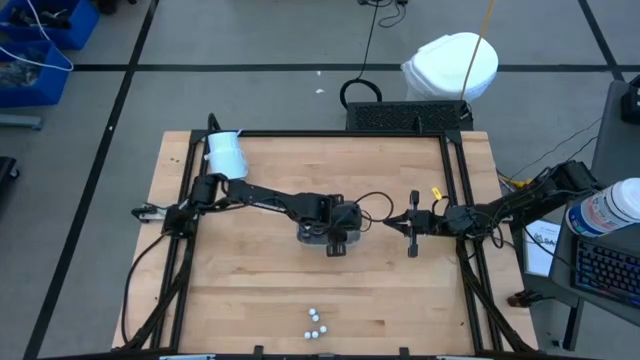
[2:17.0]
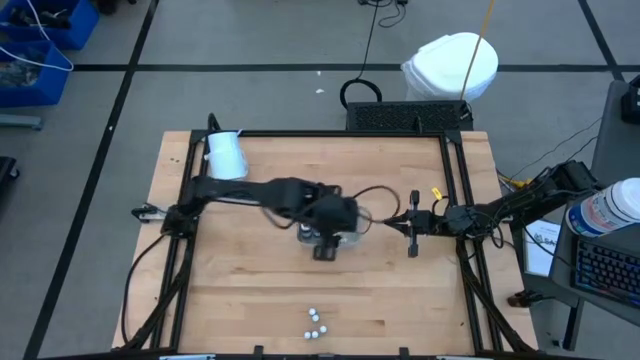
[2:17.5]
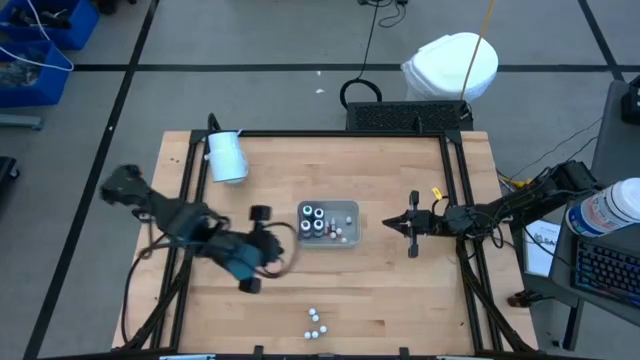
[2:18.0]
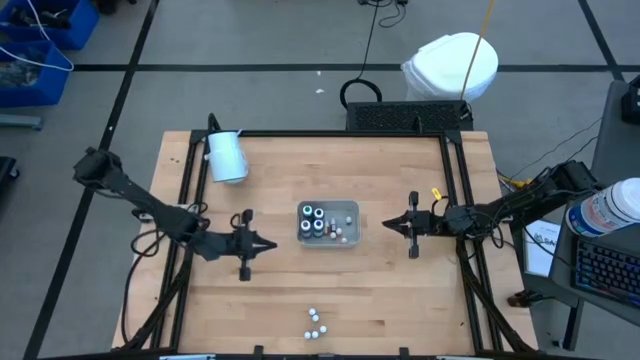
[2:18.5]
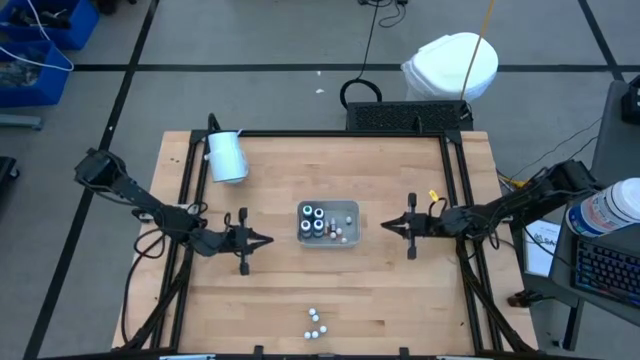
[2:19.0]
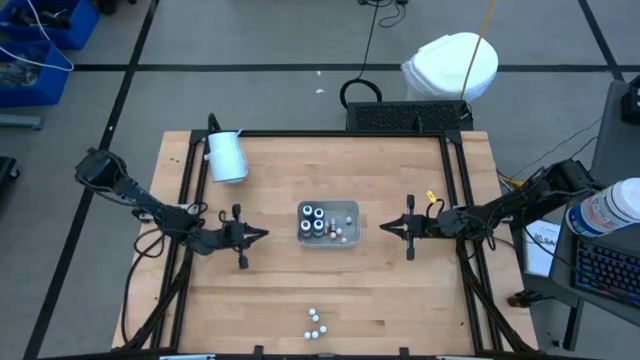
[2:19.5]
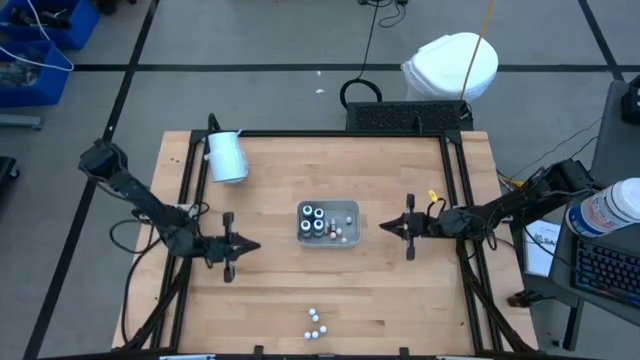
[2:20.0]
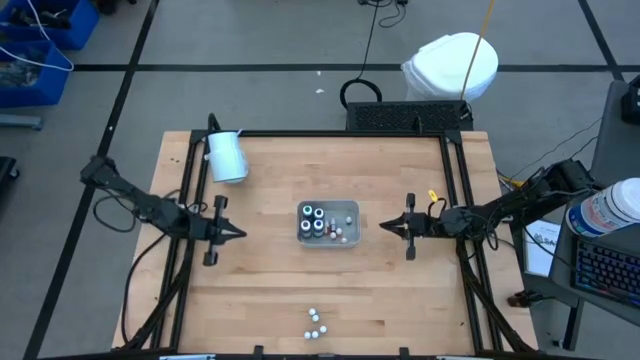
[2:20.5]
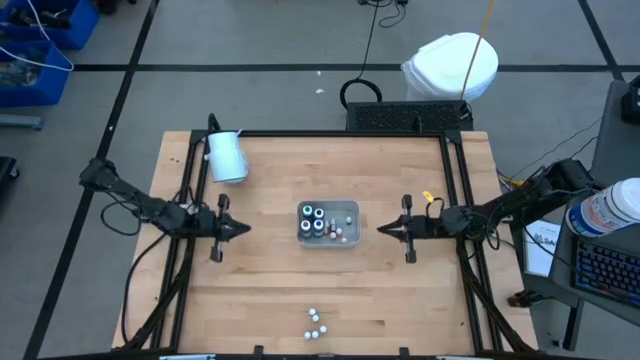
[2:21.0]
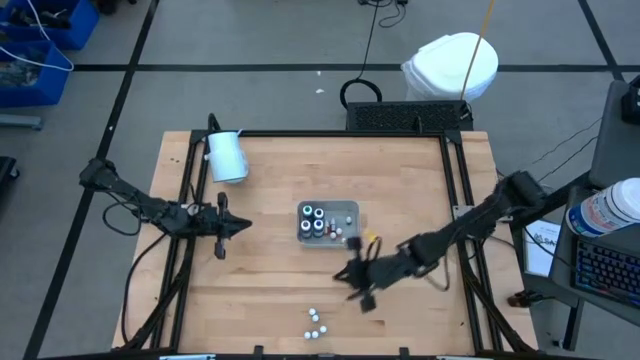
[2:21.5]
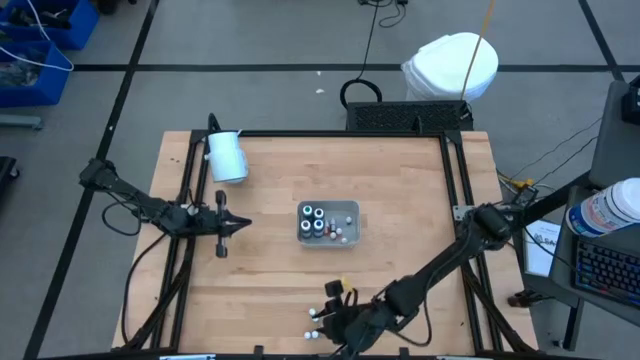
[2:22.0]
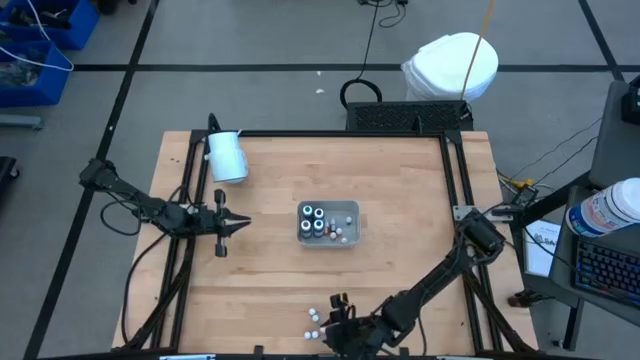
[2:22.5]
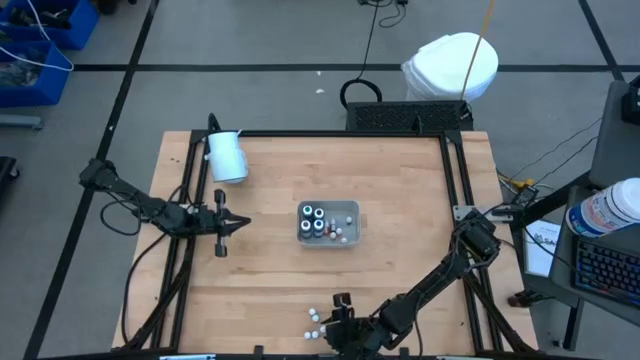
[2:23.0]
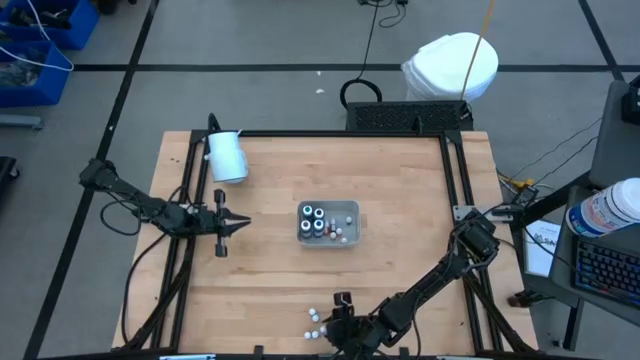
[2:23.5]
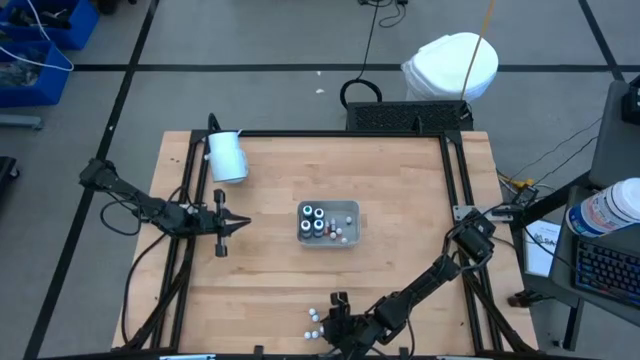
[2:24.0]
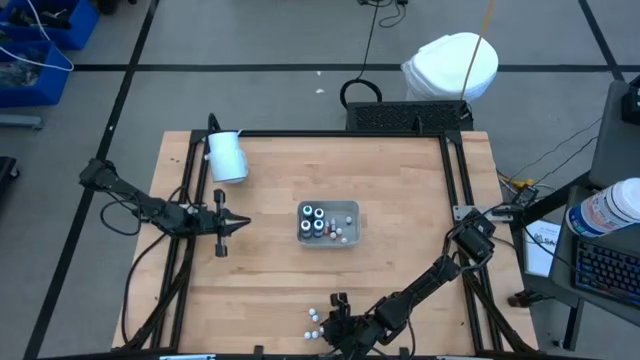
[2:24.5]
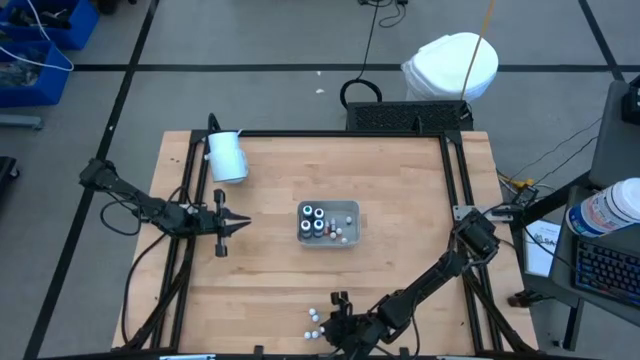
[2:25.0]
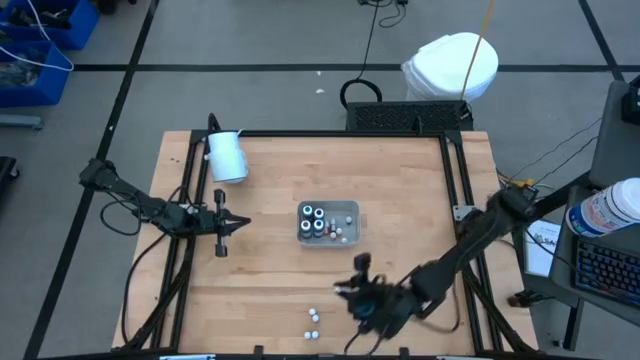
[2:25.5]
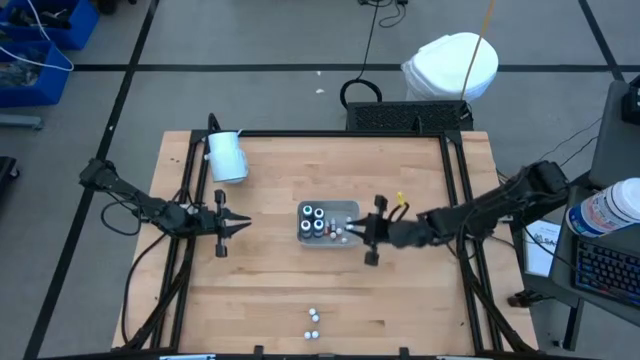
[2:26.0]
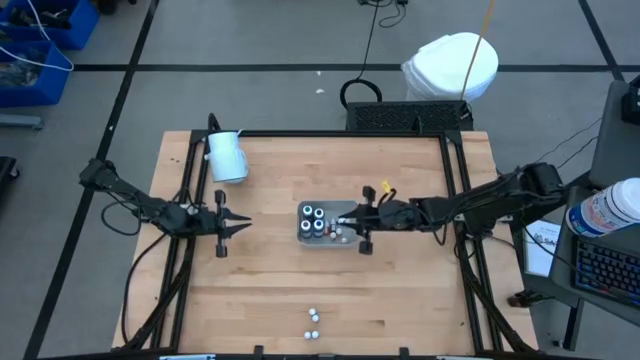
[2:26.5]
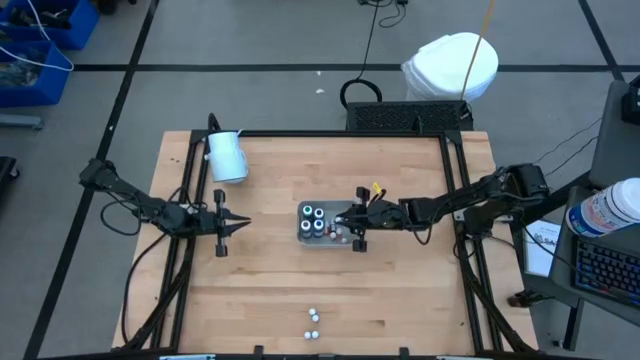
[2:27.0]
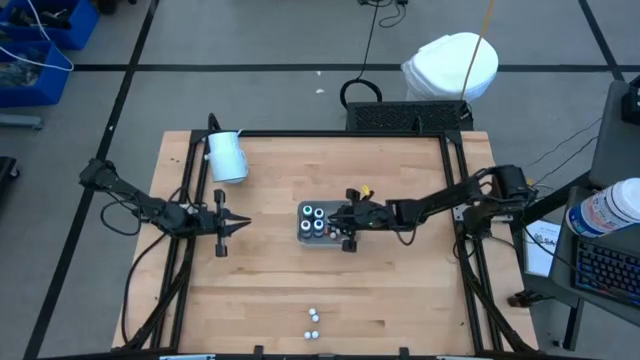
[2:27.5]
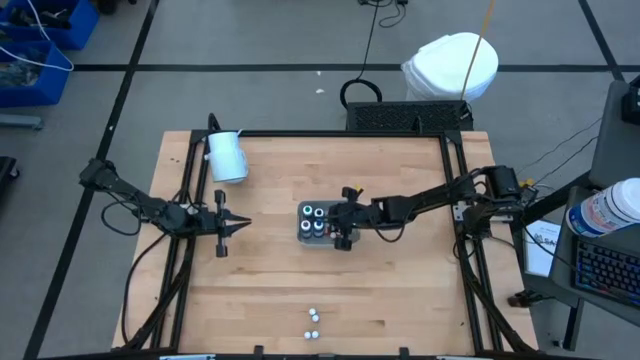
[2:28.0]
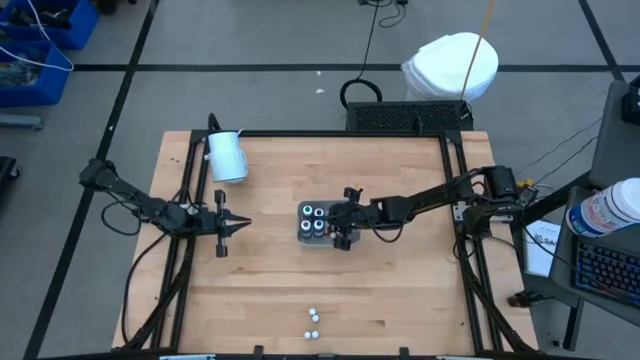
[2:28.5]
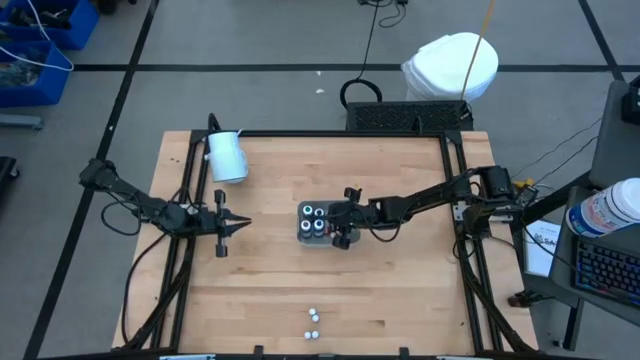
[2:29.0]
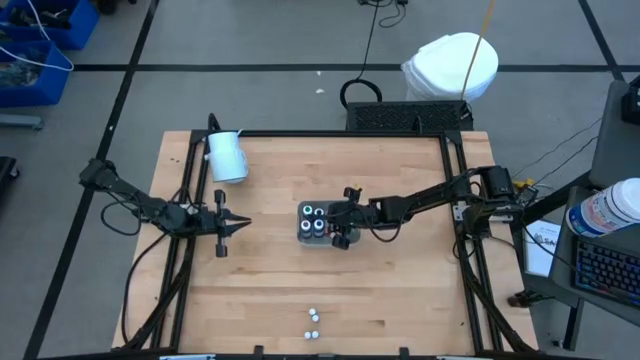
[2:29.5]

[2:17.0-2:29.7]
Task: Pick & Place food coloring
Put the small red food coloring bottle into the gray bin

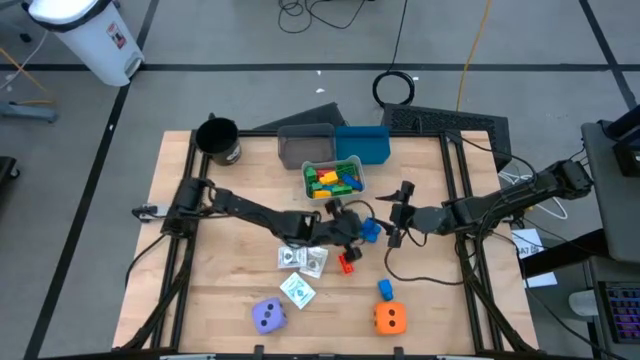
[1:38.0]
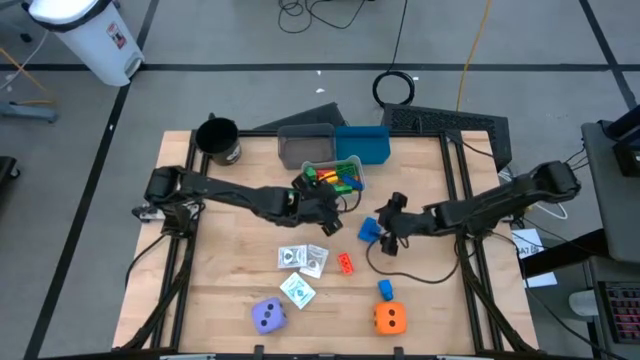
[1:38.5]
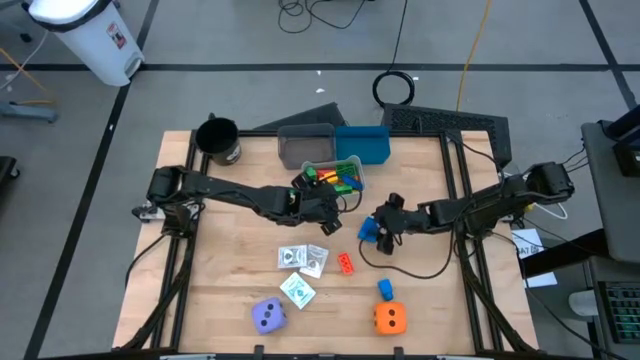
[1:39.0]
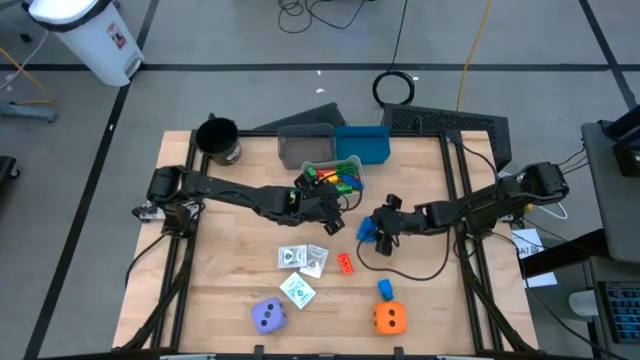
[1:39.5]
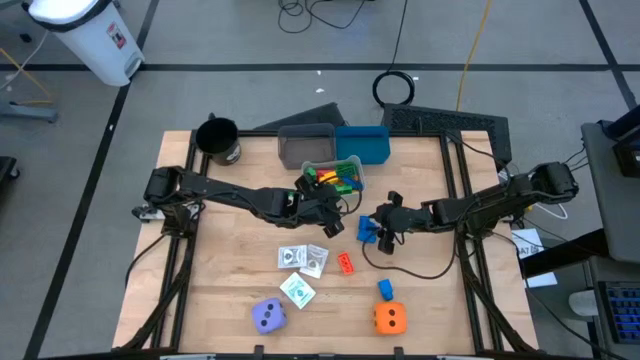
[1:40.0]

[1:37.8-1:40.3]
Task: Pick & Place Toys
Put the blue game piece into the gray bin

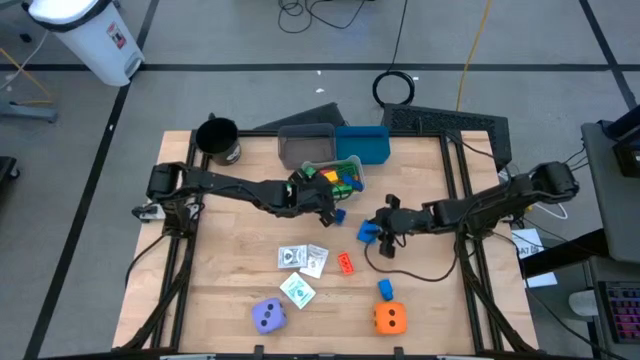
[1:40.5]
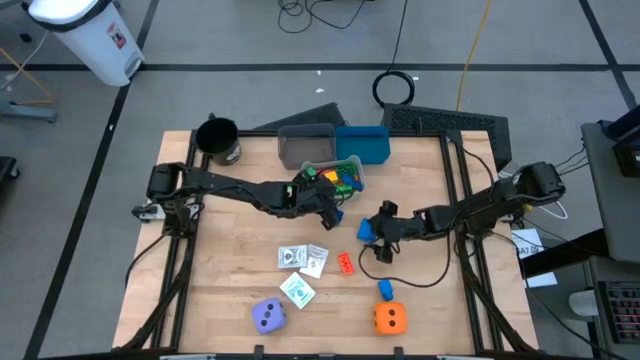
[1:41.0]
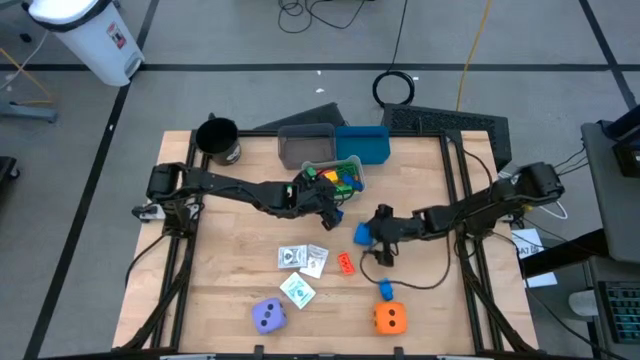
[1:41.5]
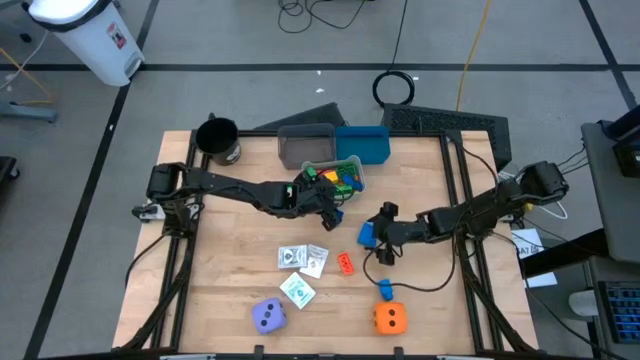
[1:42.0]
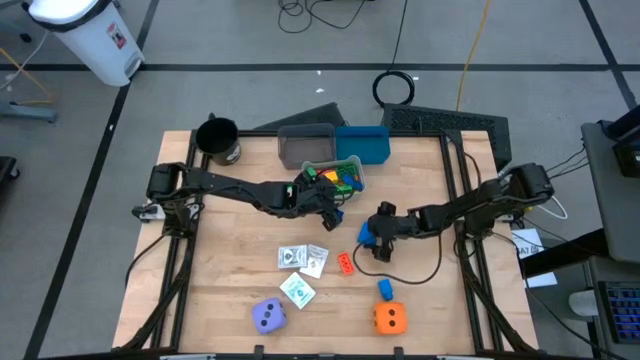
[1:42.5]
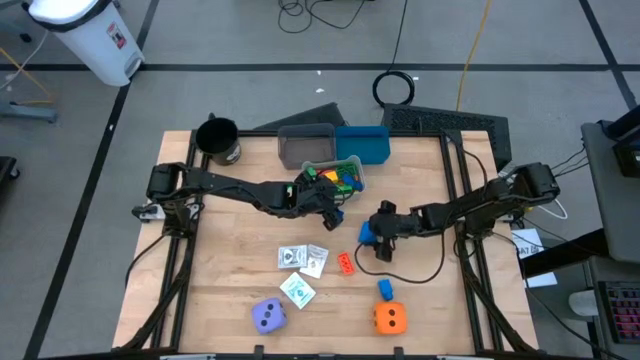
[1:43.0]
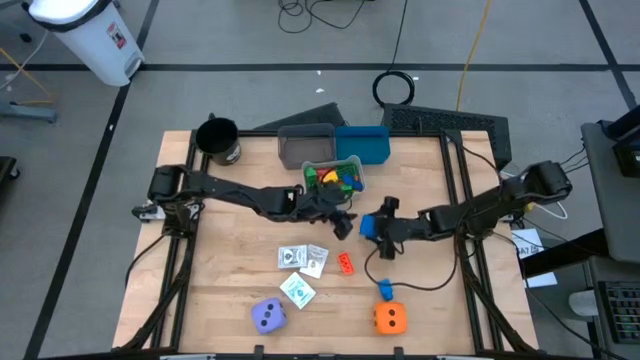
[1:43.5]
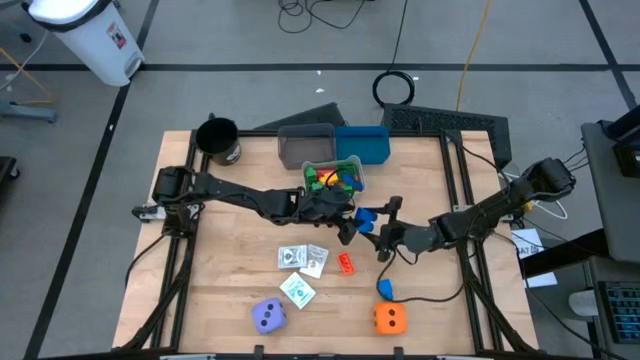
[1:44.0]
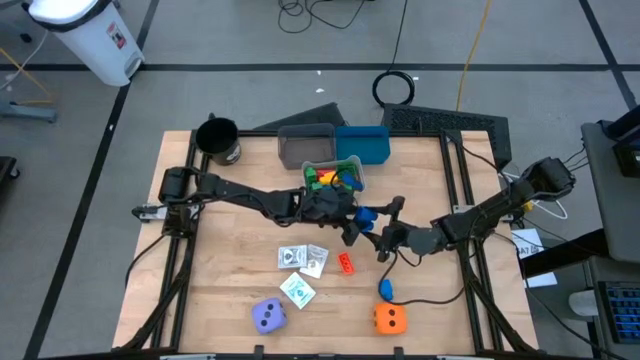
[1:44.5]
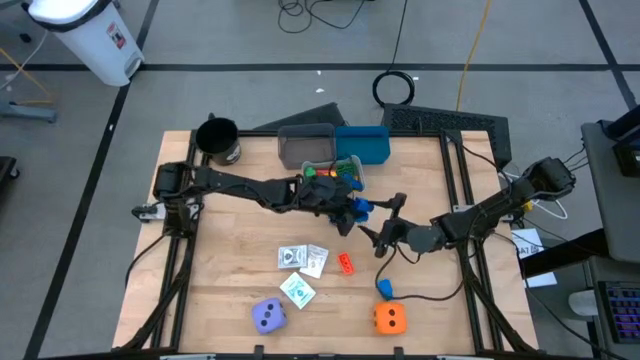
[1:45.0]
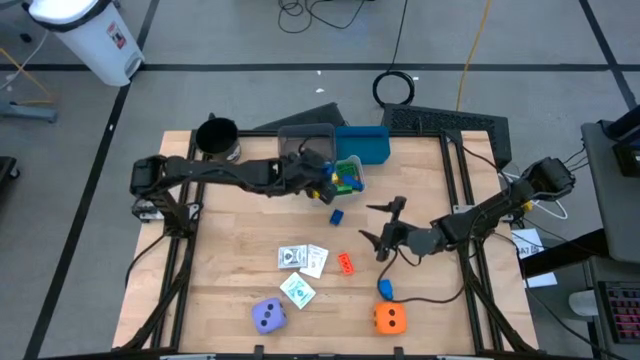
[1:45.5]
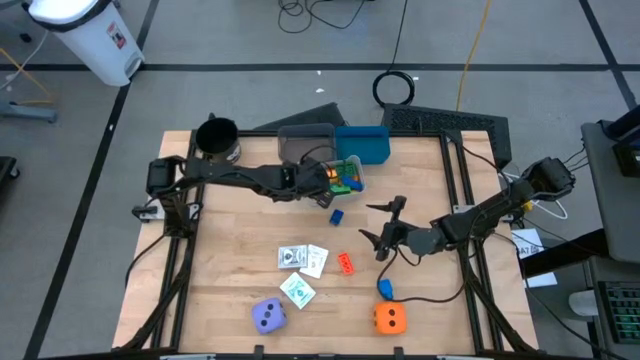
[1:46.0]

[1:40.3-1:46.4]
Put the blue game piece into the gray bin
